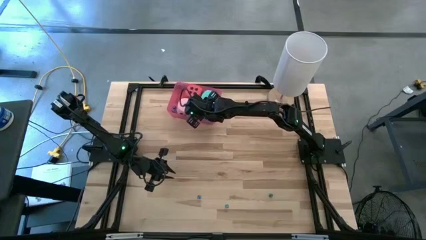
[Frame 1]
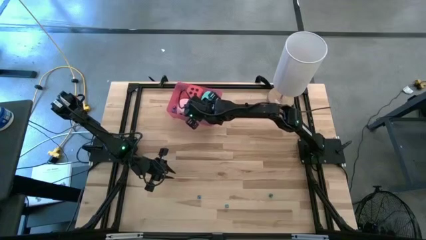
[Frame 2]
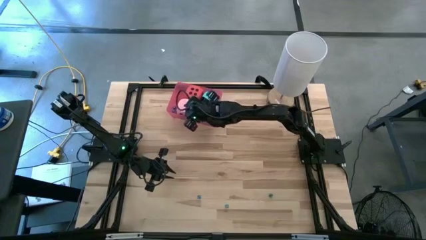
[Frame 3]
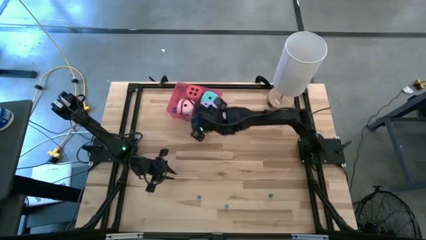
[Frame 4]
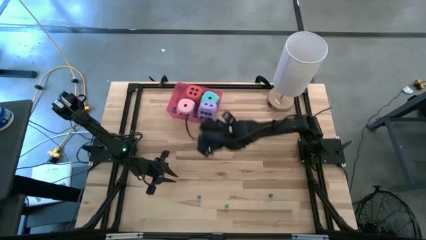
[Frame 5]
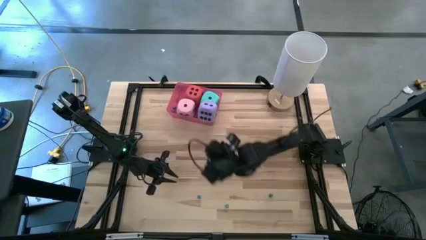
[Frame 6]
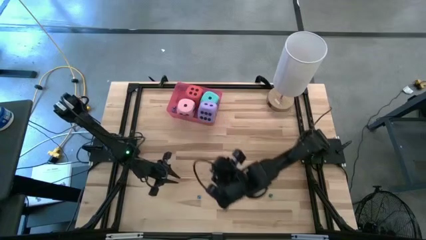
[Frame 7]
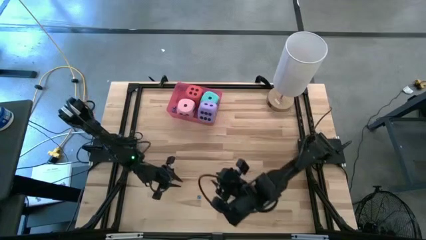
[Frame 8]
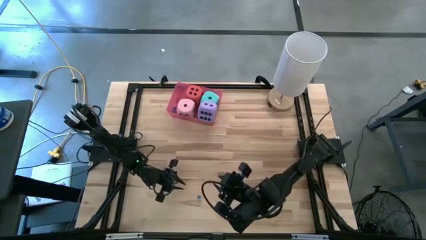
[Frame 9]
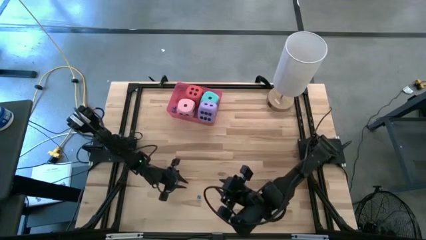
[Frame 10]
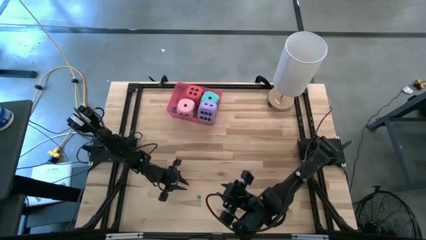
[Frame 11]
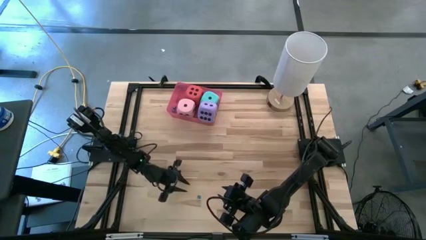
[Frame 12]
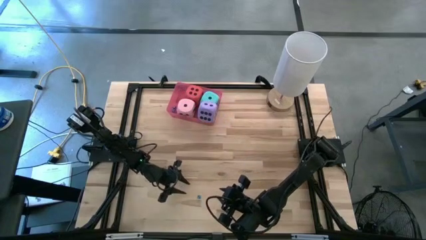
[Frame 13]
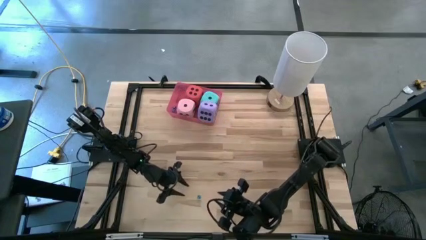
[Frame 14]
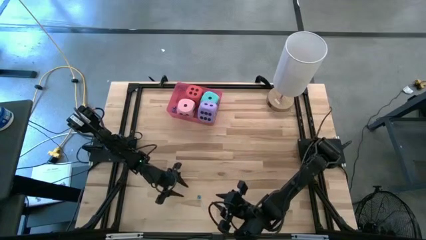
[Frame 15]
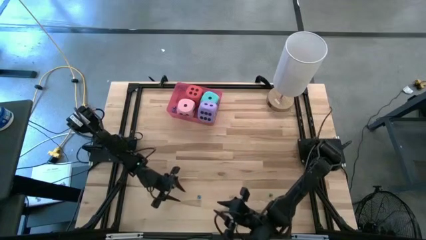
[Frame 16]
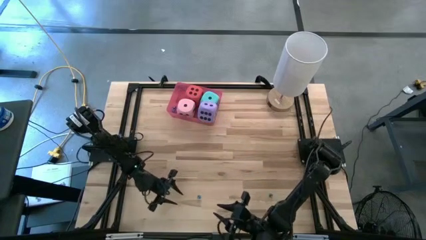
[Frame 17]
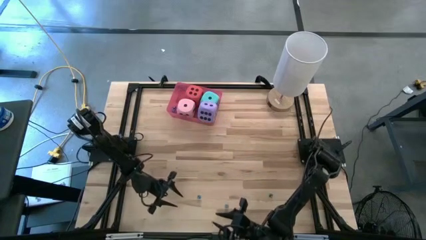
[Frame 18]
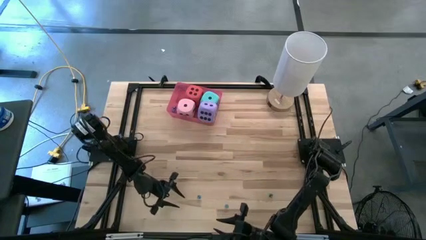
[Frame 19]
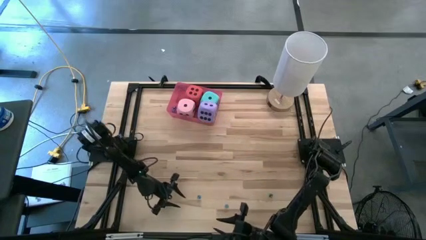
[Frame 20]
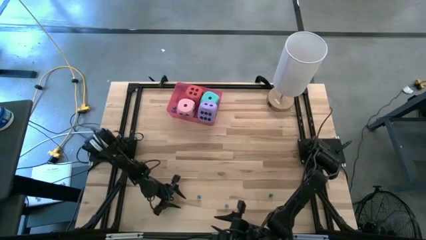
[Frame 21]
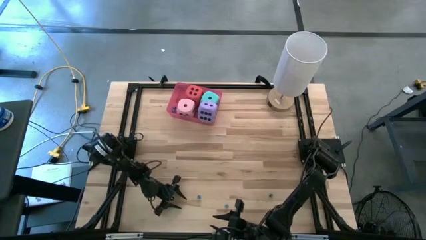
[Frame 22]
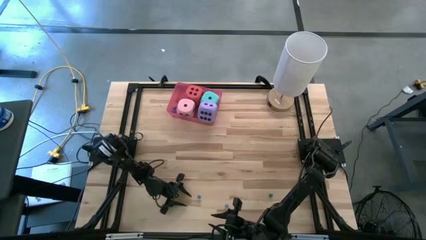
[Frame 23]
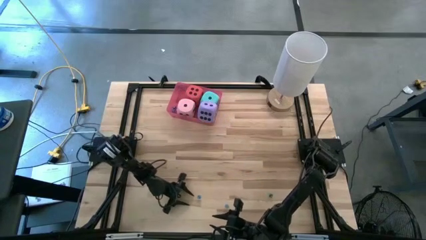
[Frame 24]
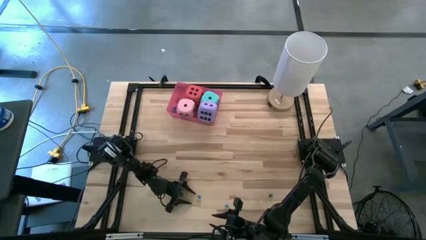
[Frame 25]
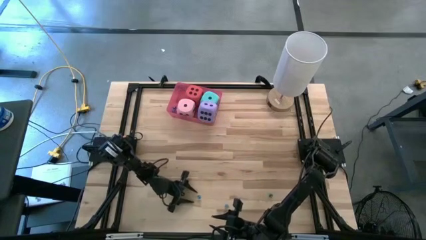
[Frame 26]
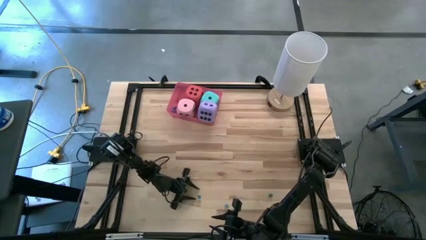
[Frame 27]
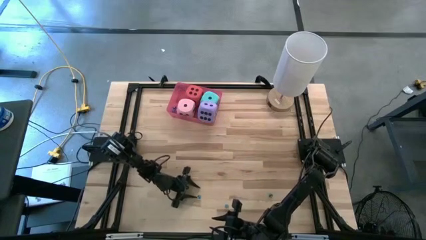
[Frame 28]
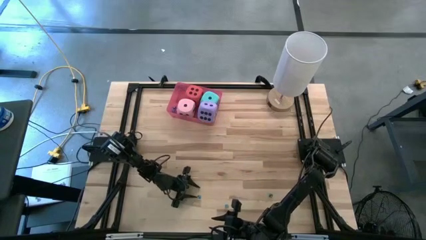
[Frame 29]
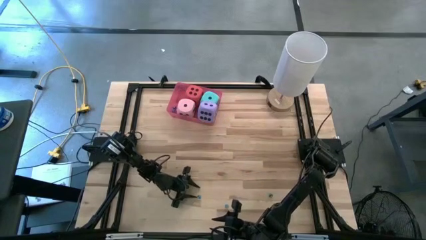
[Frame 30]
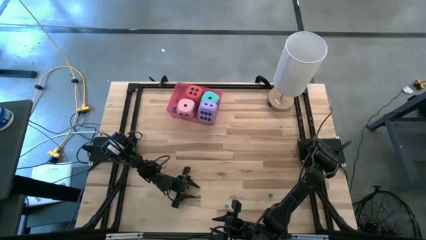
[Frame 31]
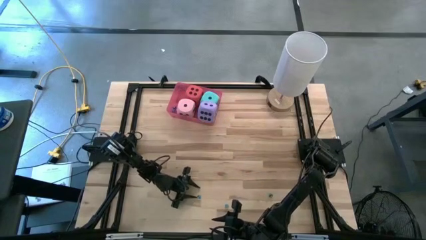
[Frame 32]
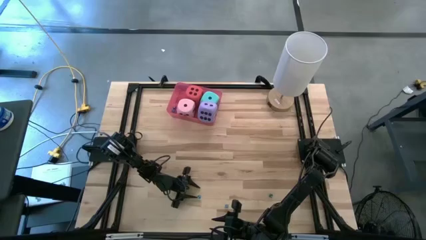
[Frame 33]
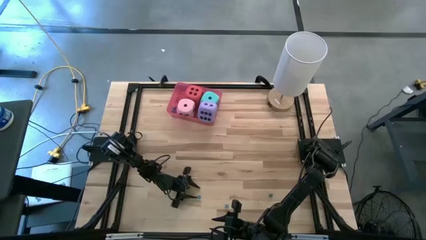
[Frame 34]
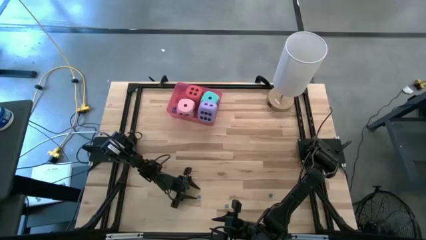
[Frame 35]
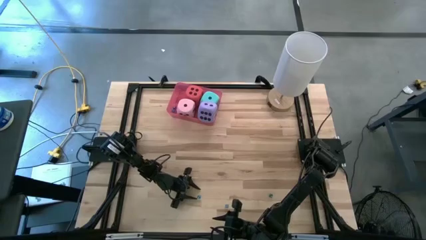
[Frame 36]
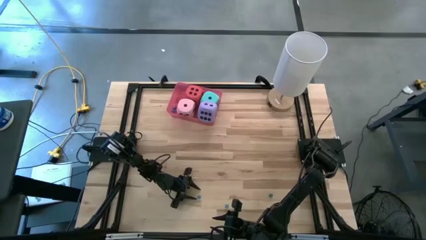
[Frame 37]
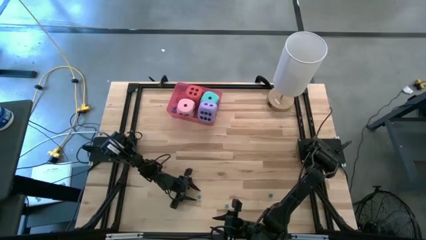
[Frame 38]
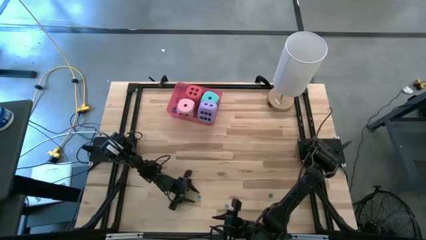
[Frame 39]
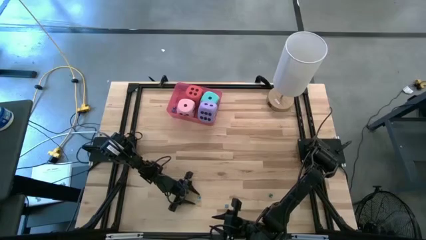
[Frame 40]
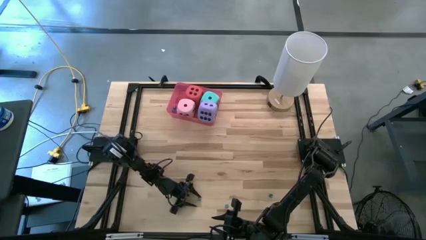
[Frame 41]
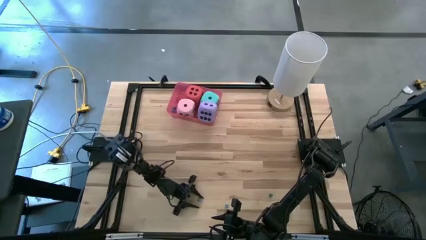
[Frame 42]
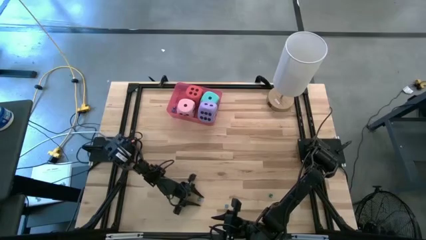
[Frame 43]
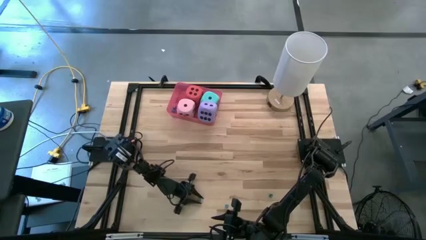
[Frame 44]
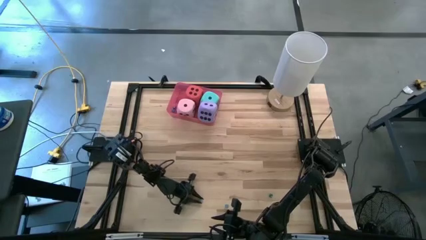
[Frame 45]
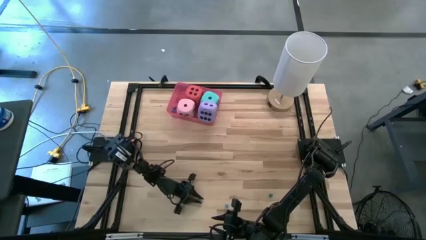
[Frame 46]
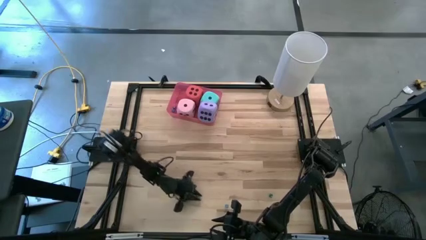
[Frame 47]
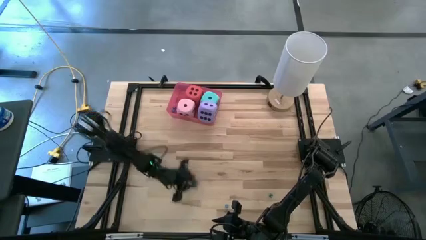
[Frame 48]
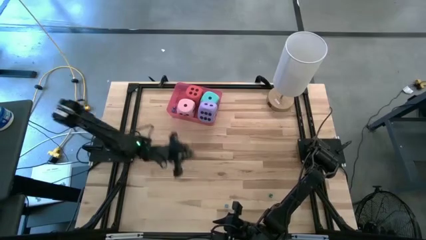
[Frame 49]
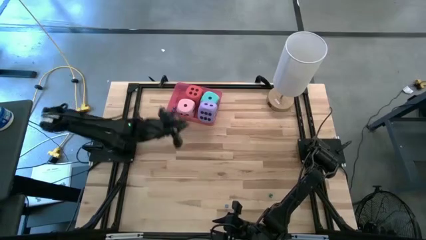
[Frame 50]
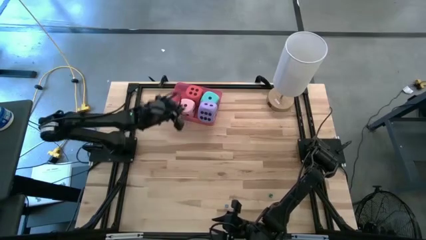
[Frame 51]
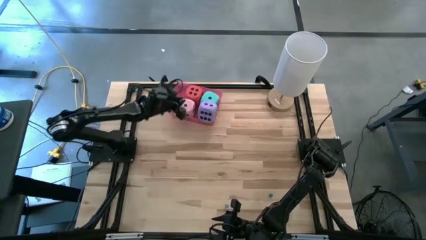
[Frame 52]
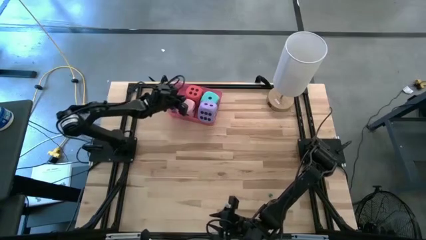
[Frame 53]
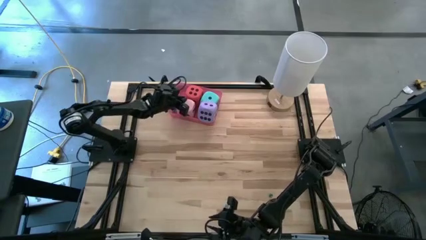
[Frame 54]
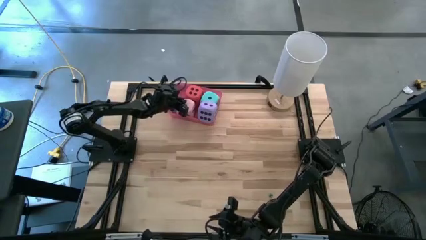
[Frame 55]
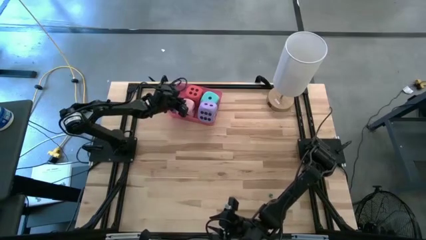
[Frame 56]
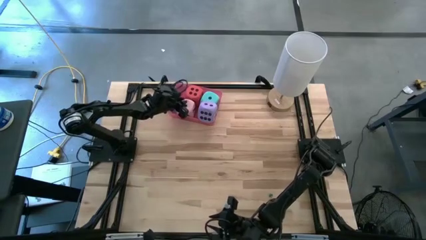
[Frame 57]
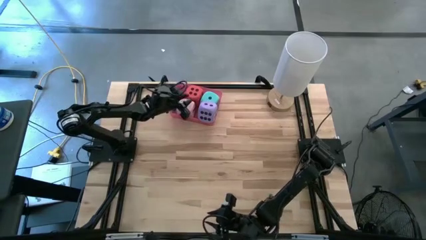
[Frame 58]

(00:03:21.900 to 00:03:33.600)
Task: Pick & Place Dice
Put the small blue dice into the pink bin
